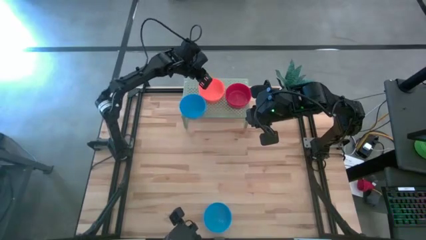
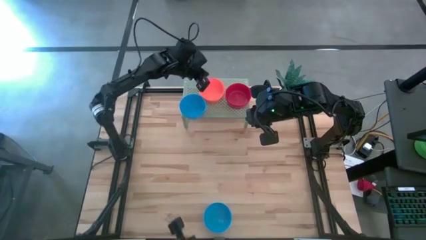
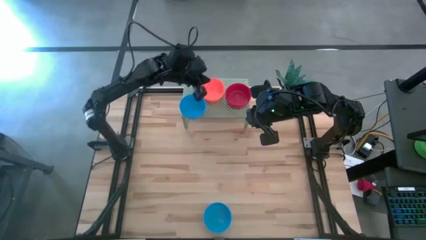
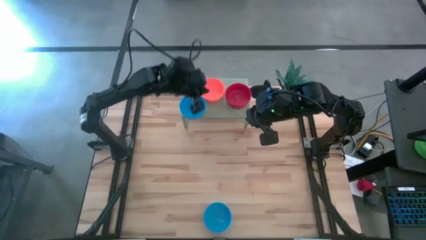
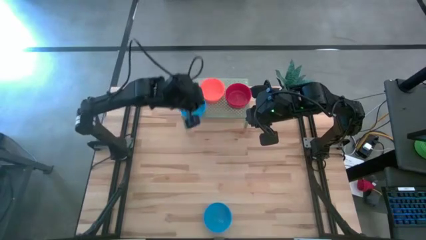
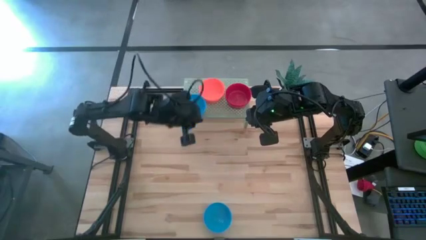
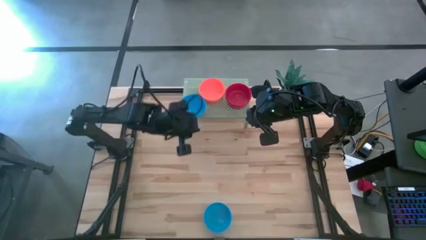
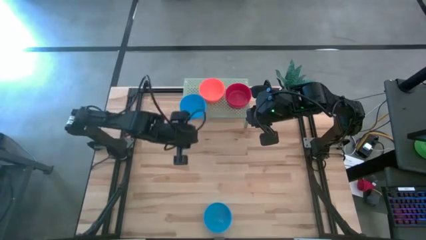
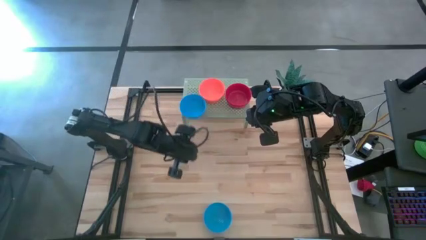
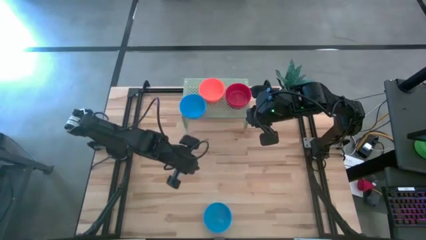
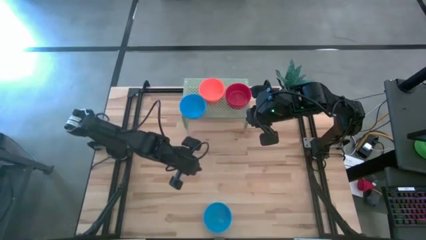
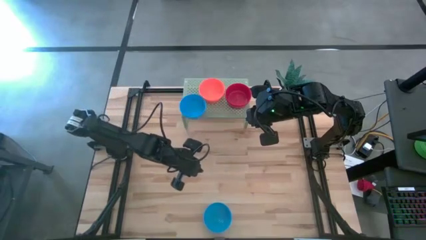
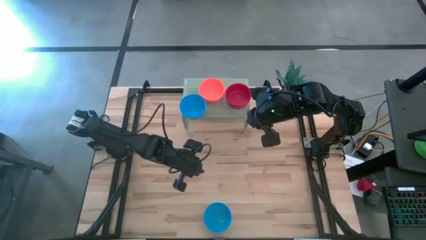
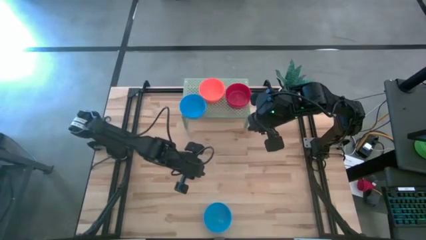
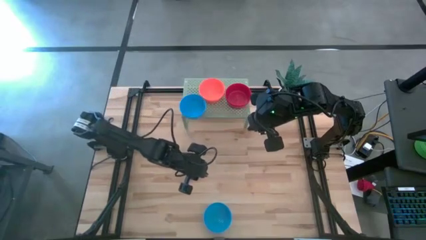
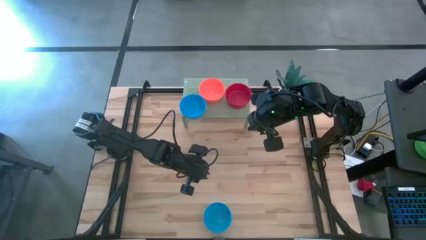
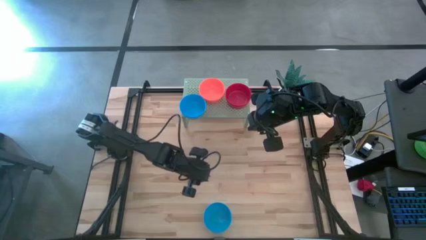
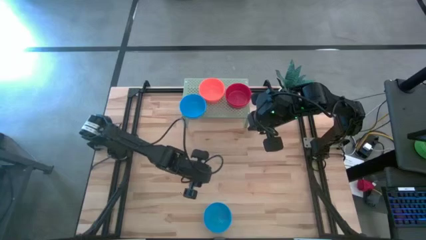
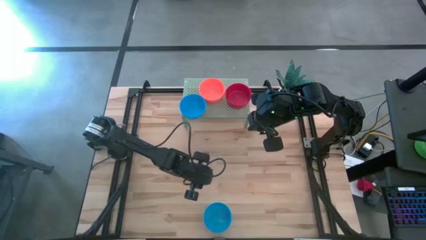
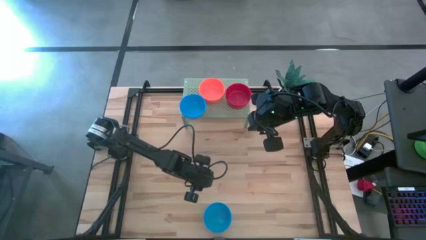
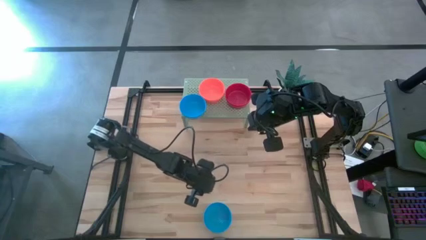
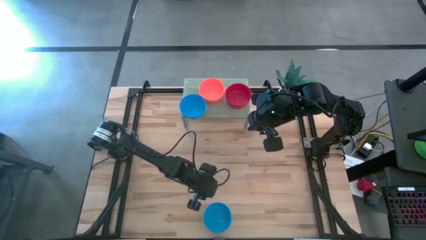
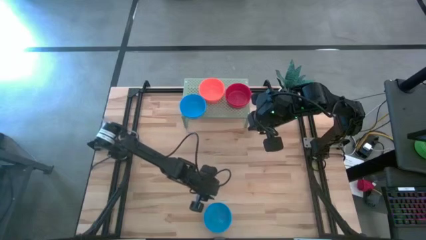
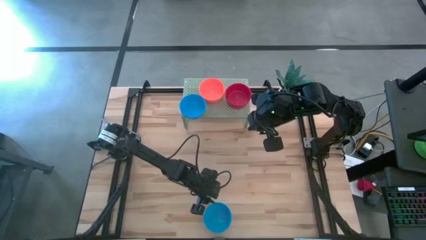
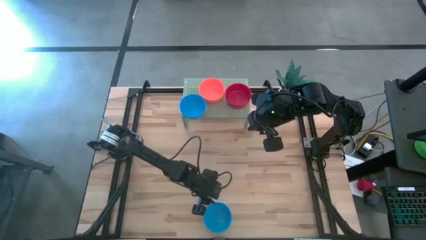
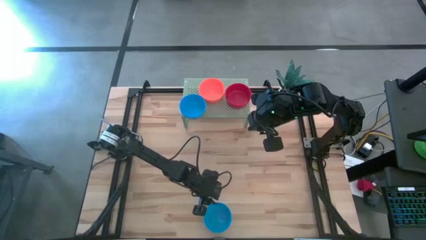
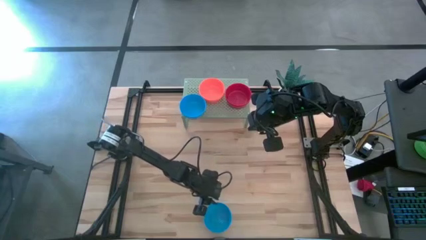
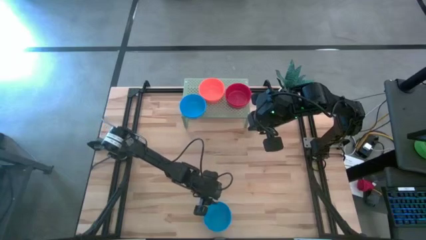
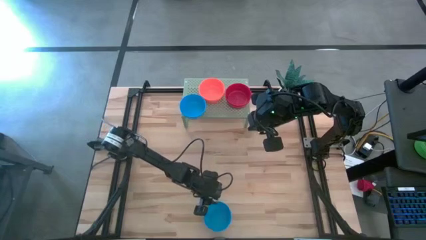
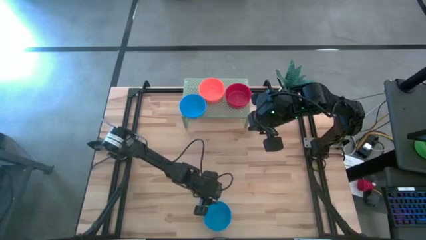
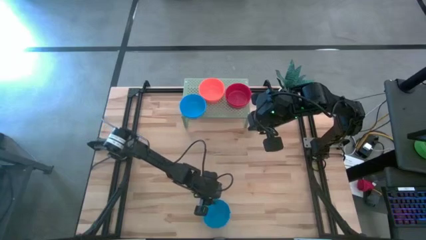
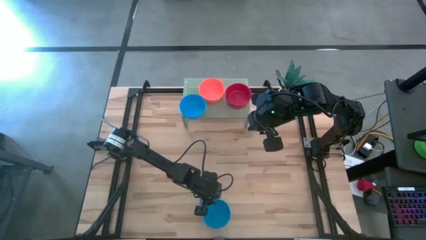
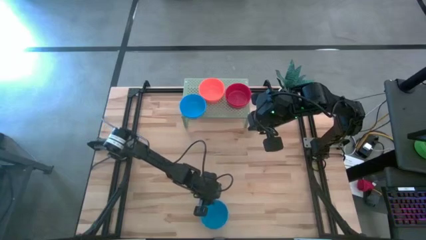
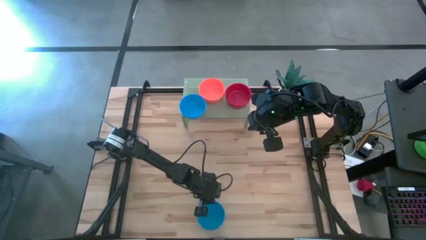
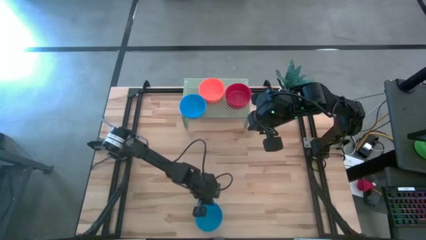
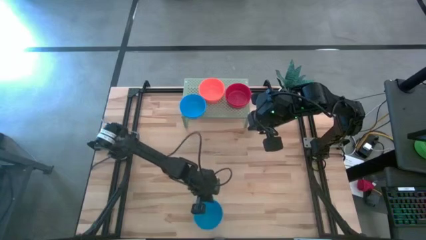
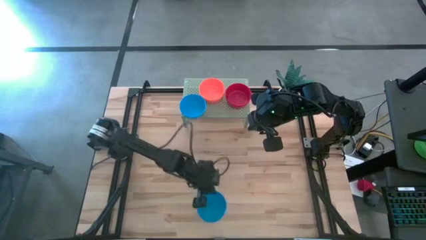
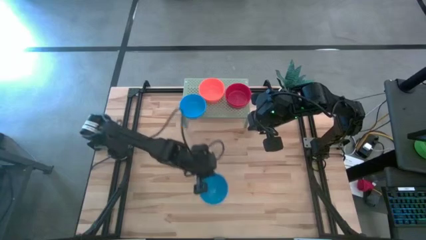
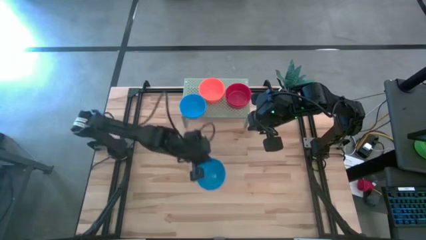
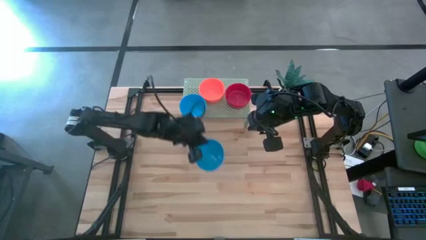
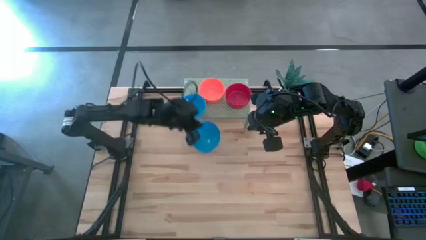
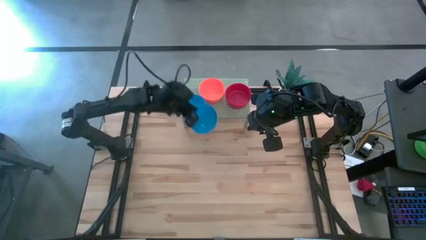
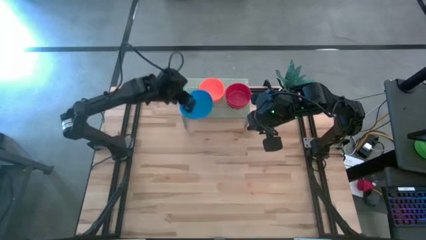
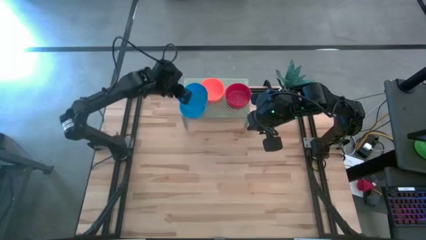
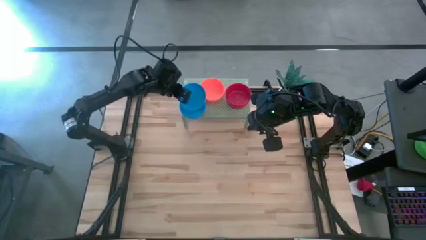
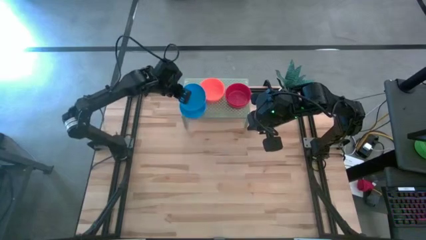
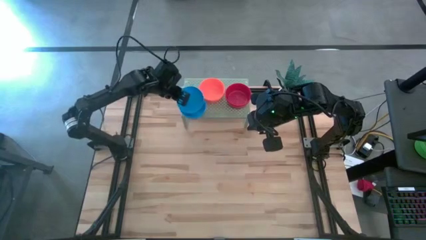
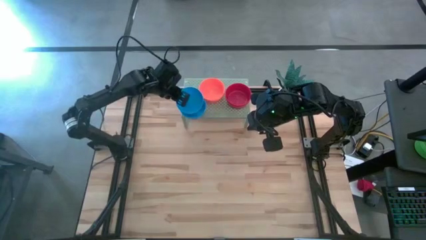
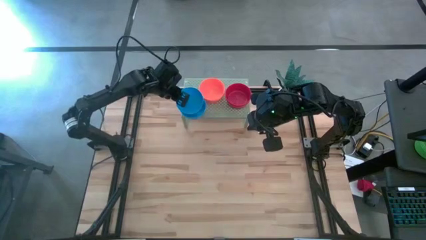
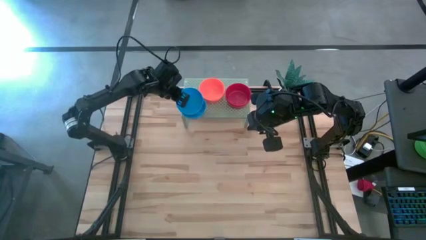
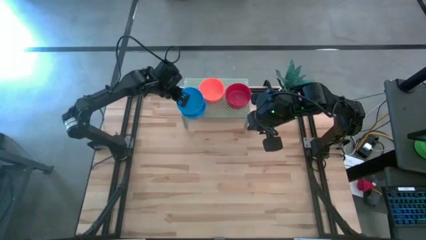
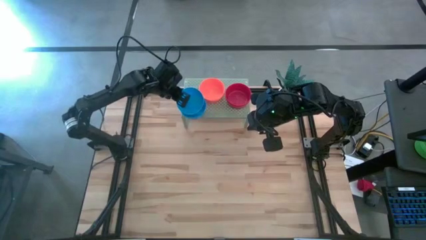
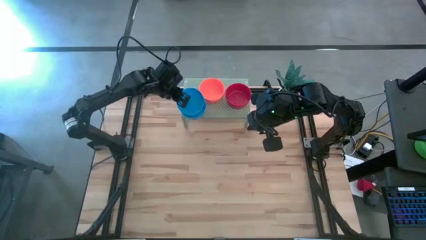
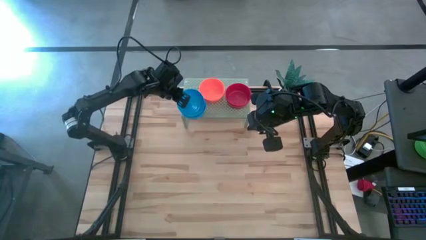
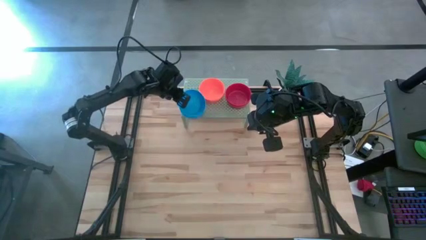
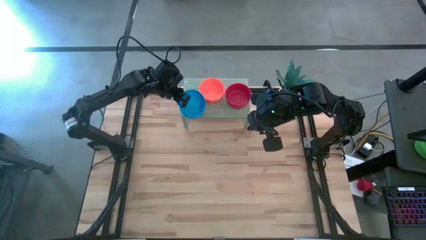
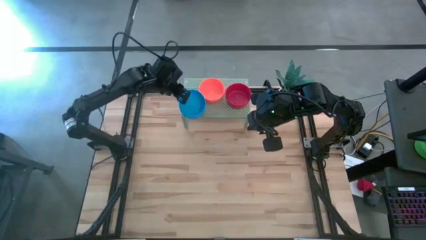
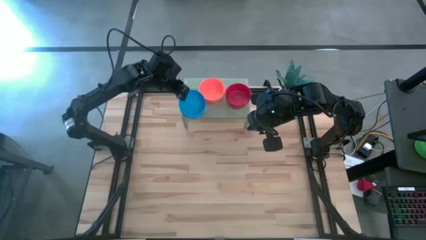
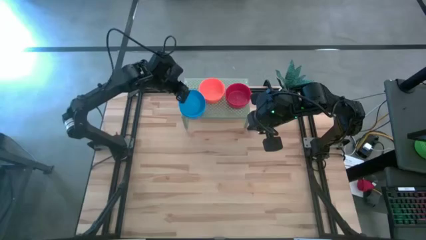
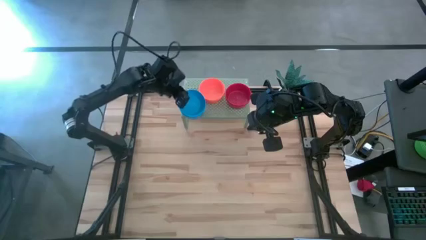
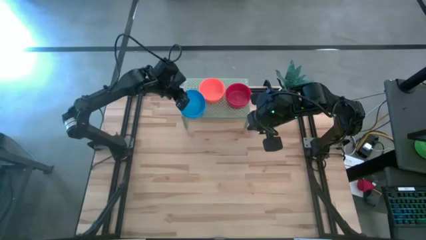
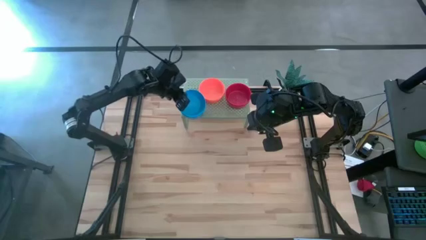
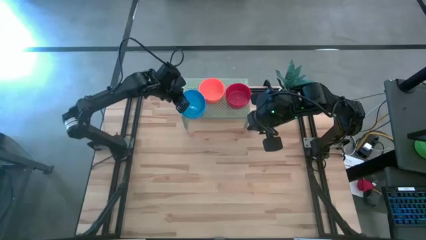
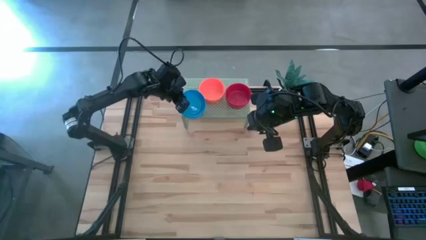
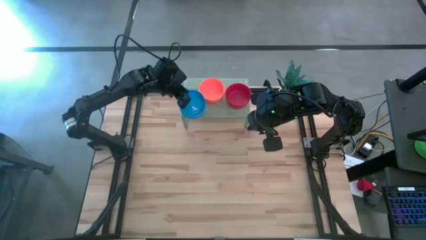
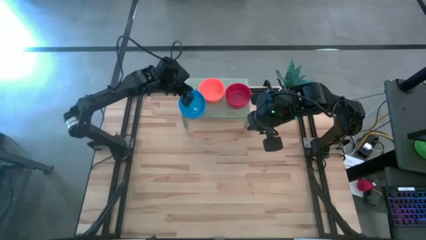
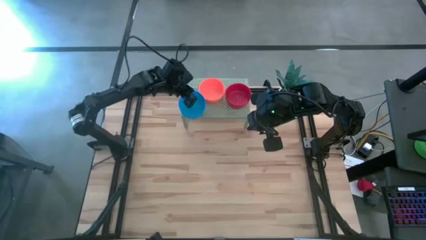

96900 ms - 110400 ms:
Task: Pick & Place Mini bowls
Stack the blue bowl on the blue bowls on the shelf

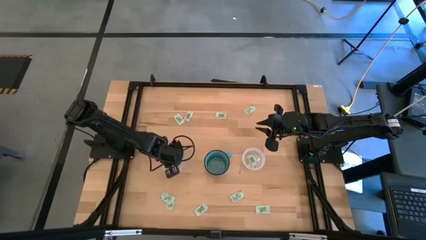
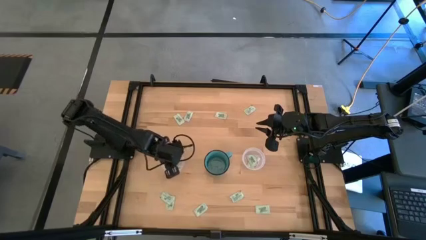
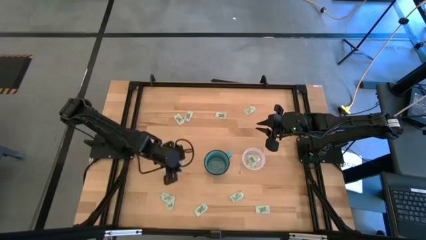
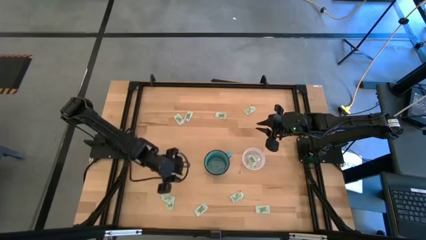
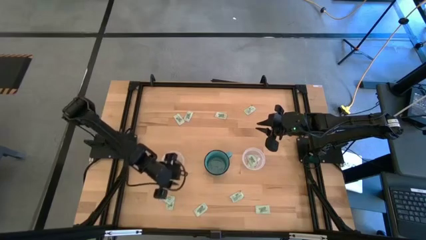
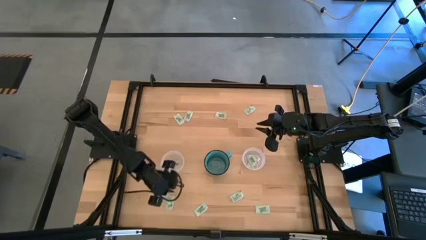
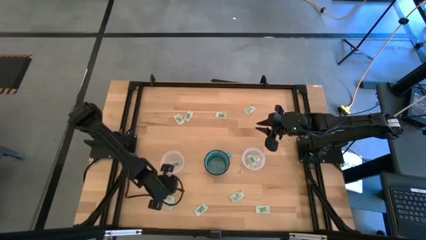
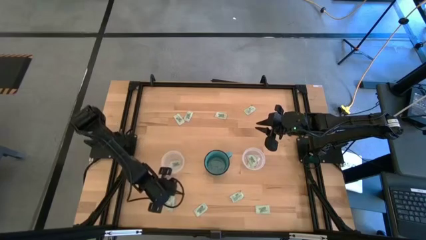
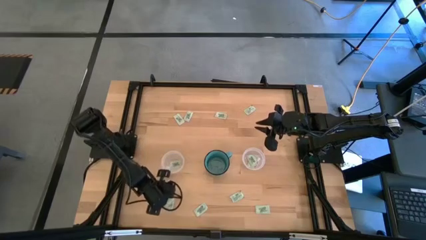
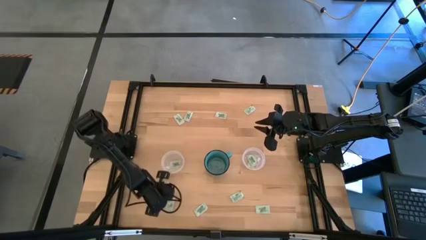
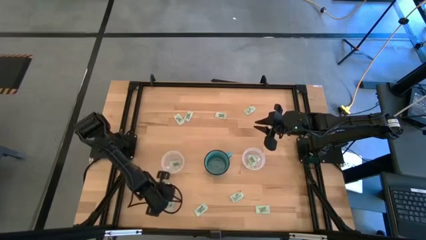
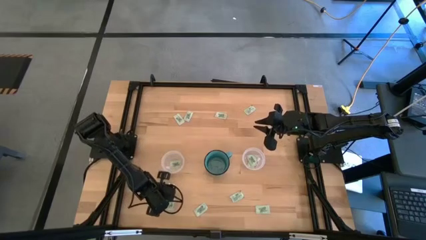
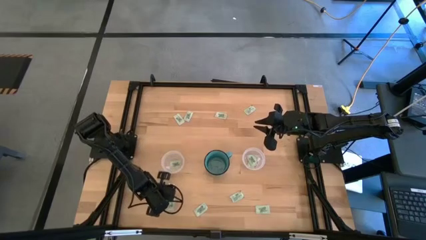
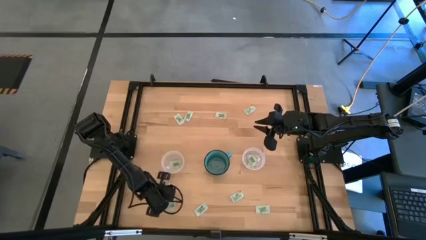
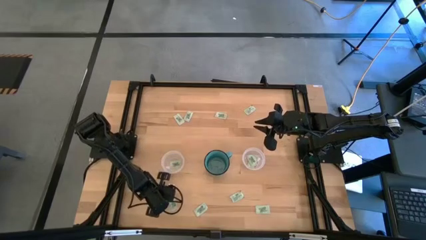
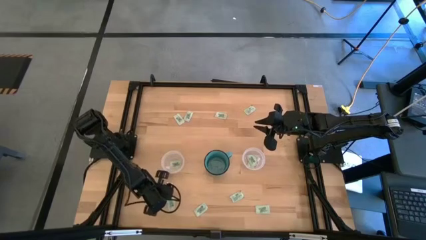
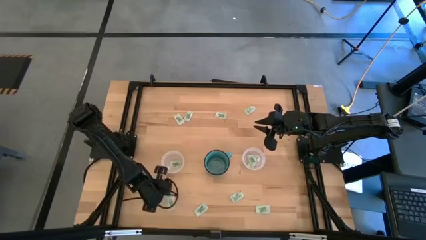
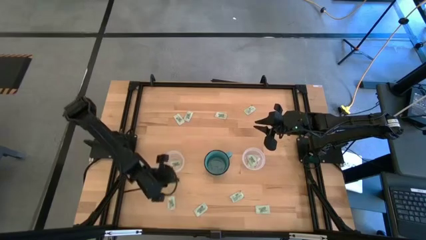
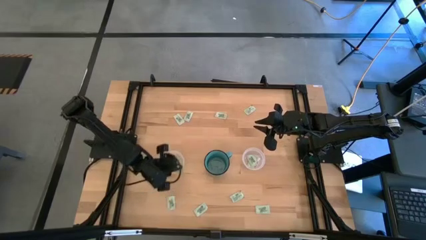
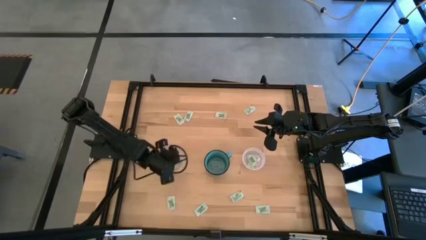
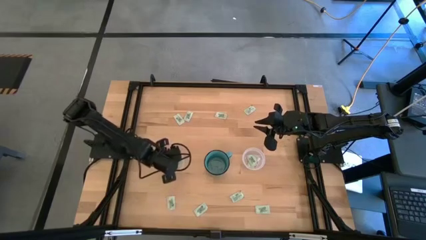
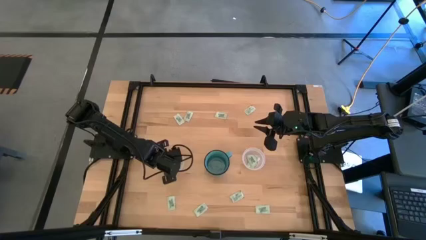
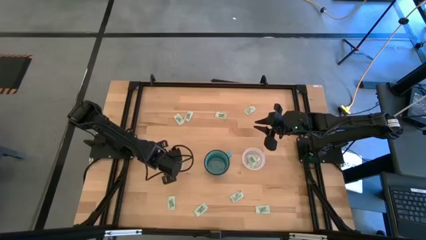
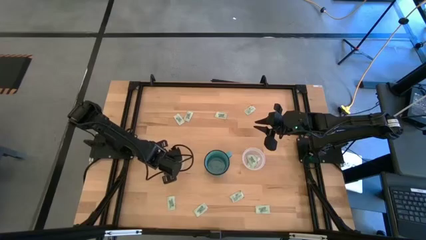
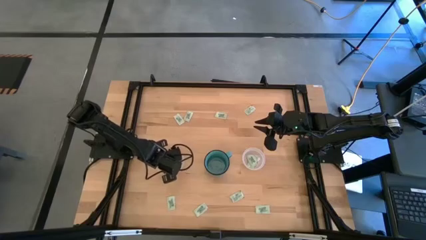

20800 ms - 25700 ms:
Task: Pick and place Stevia / Truvia into bins
Put the green stevia packet into the left transparent container
